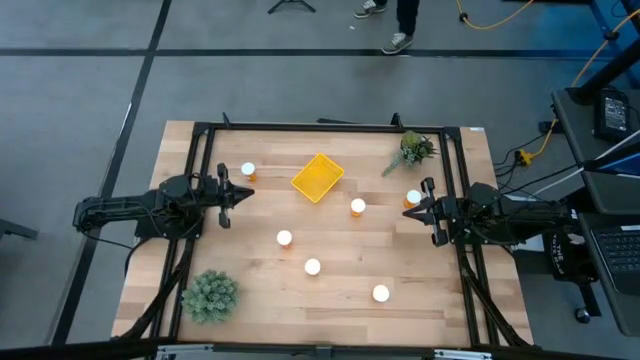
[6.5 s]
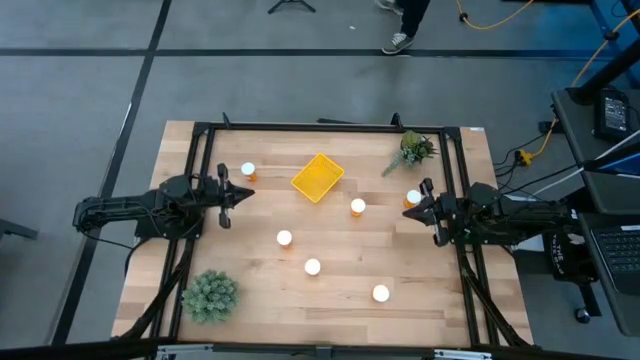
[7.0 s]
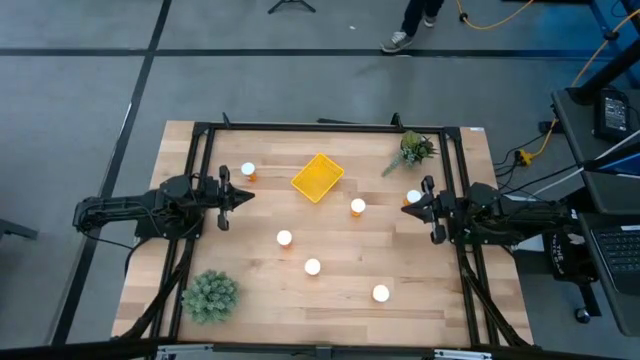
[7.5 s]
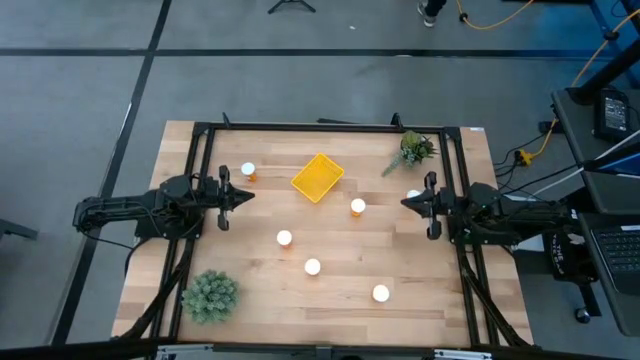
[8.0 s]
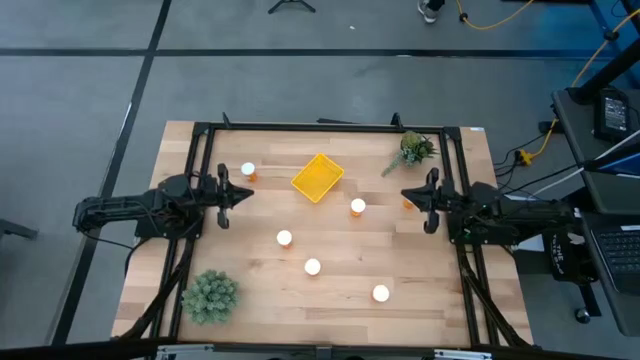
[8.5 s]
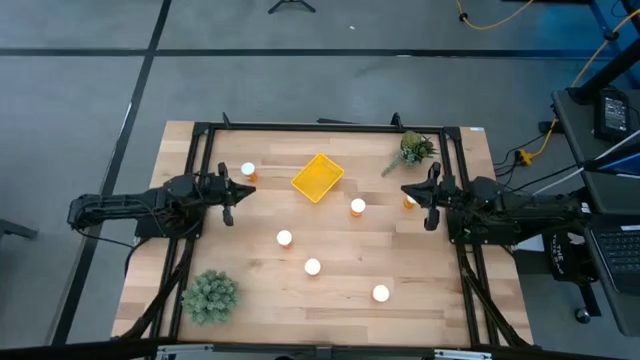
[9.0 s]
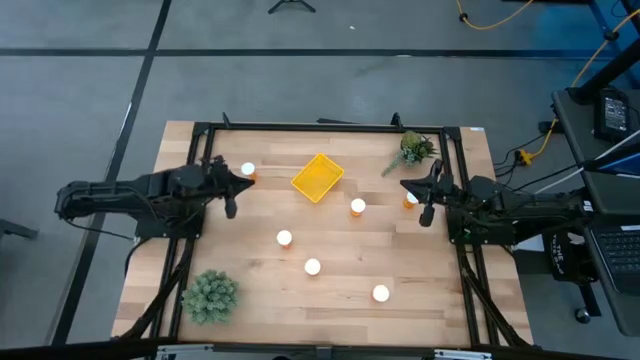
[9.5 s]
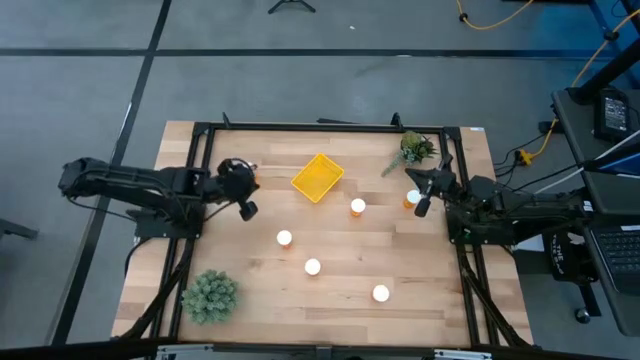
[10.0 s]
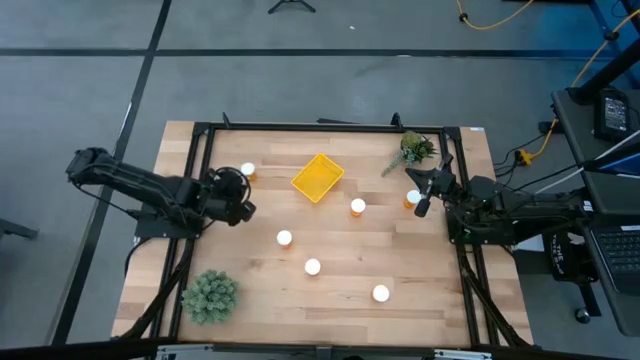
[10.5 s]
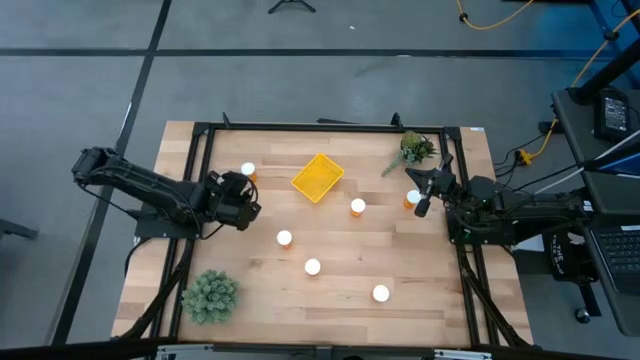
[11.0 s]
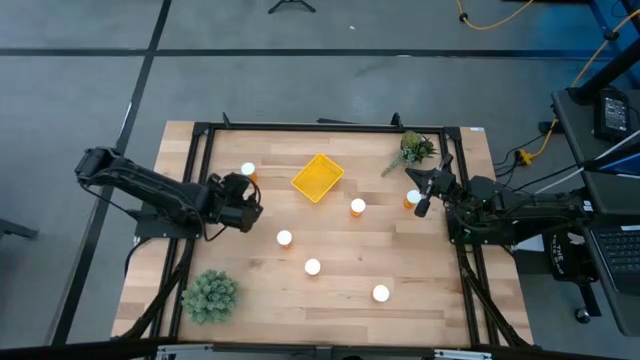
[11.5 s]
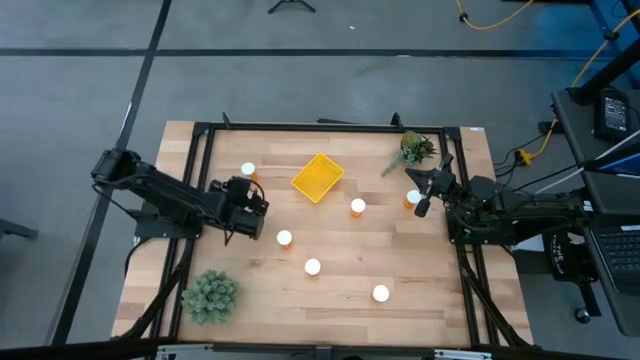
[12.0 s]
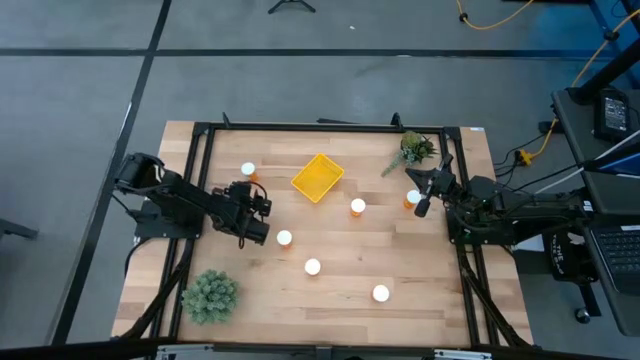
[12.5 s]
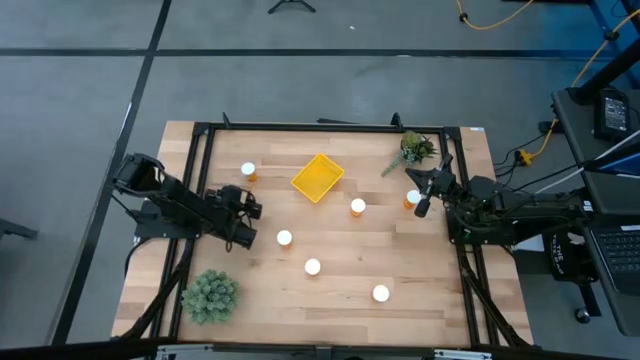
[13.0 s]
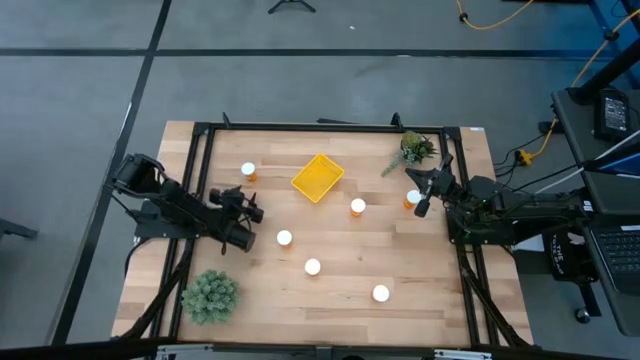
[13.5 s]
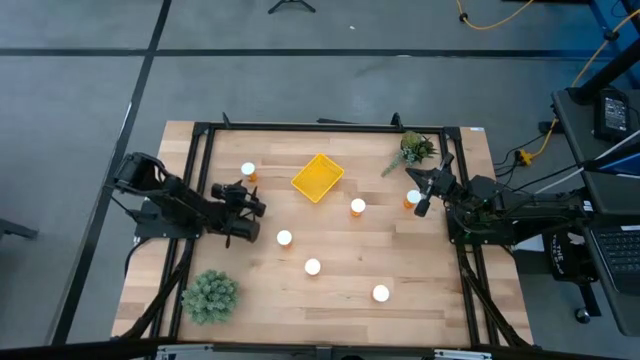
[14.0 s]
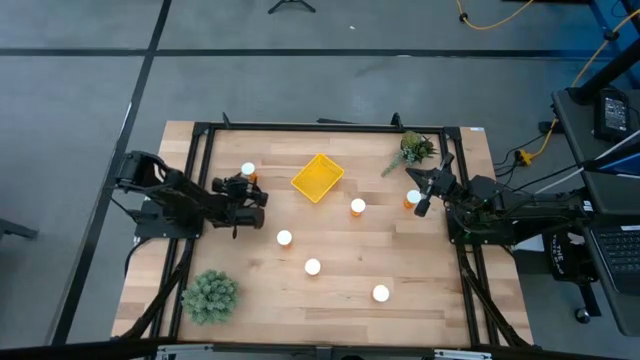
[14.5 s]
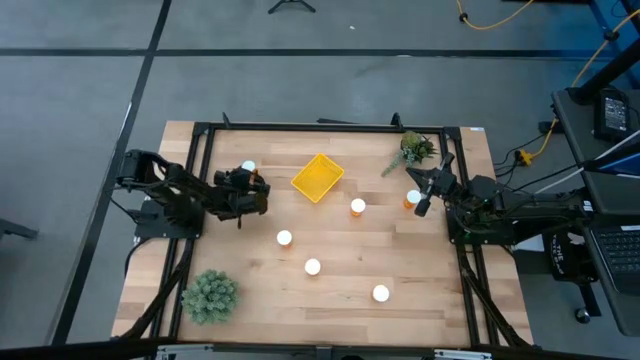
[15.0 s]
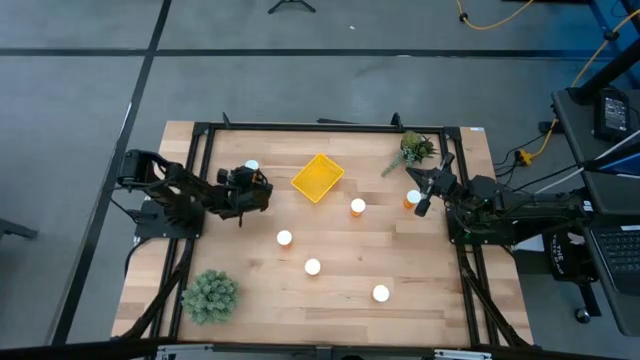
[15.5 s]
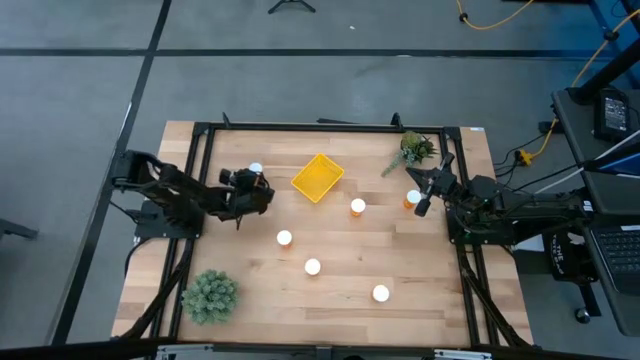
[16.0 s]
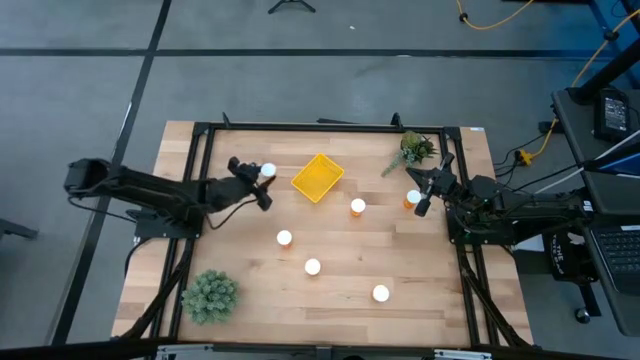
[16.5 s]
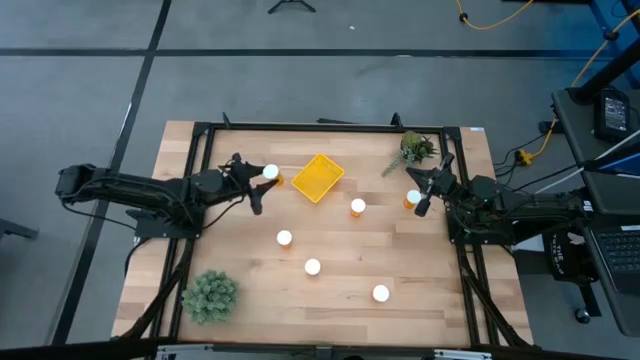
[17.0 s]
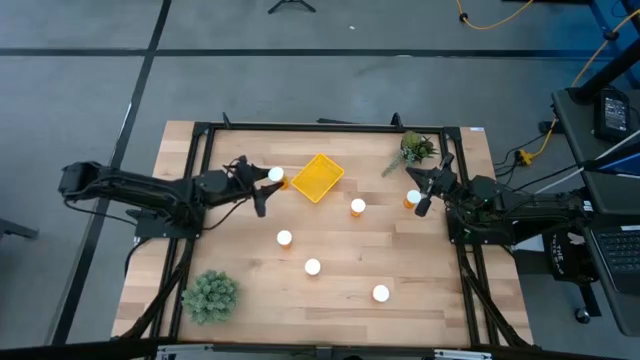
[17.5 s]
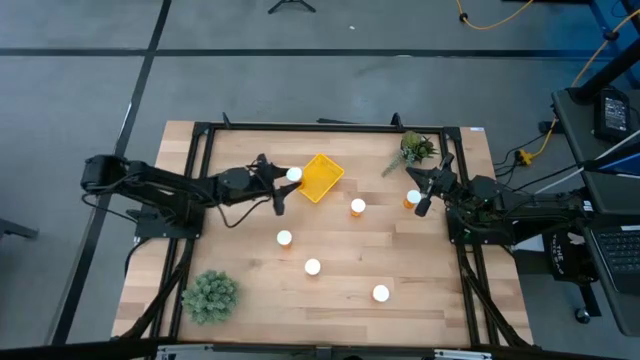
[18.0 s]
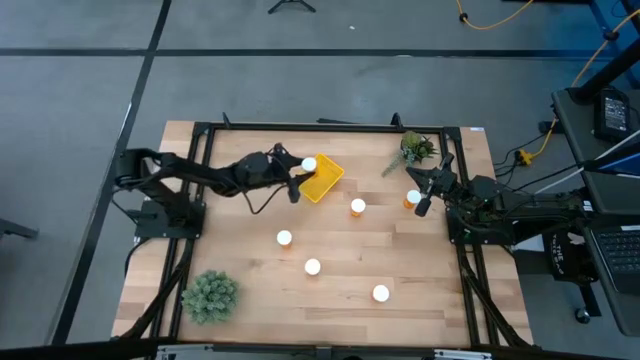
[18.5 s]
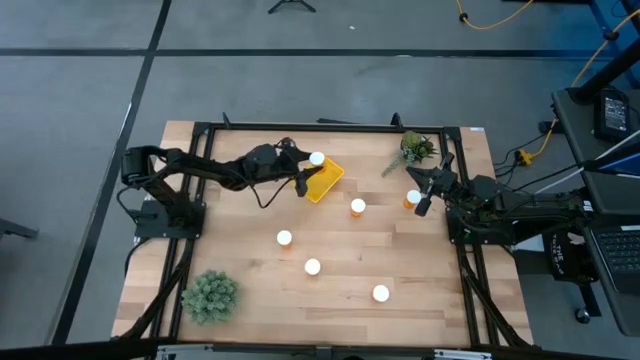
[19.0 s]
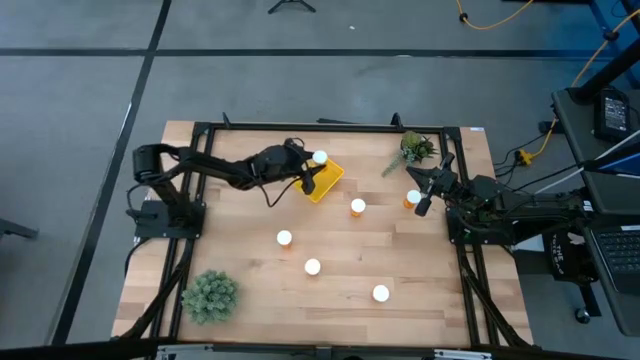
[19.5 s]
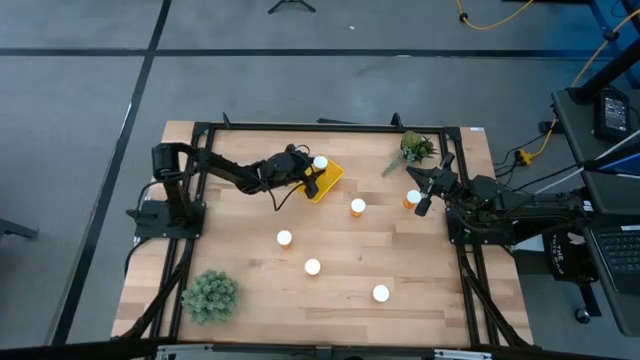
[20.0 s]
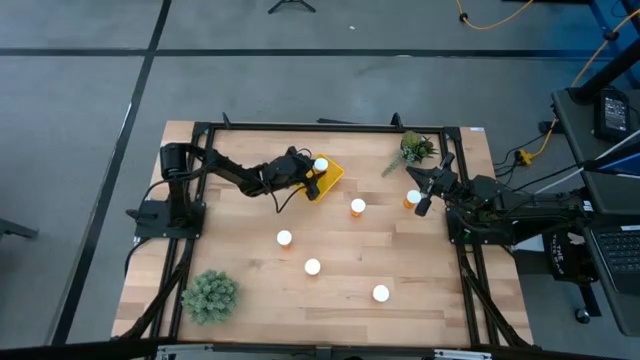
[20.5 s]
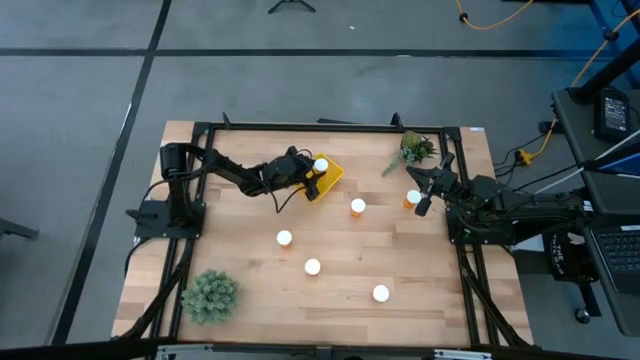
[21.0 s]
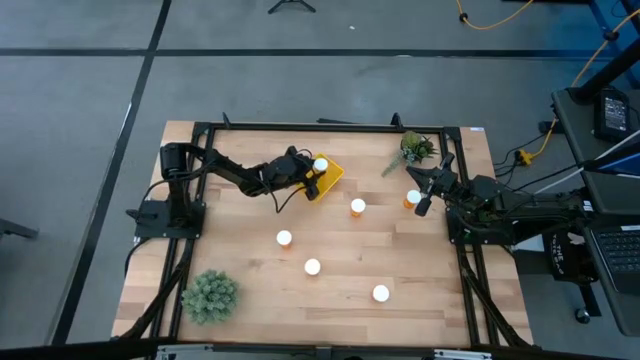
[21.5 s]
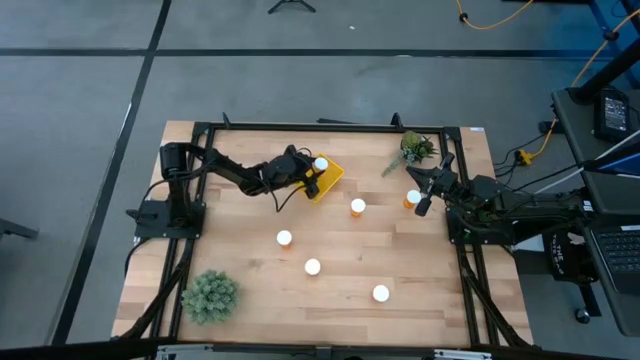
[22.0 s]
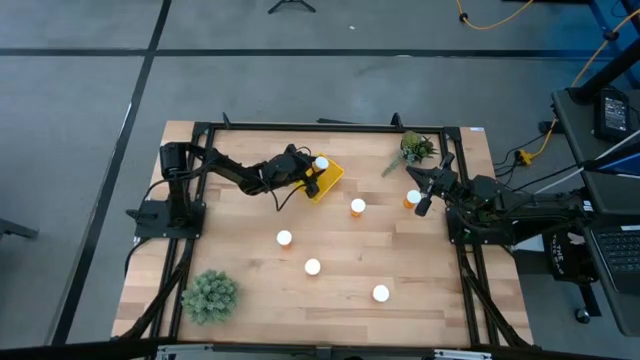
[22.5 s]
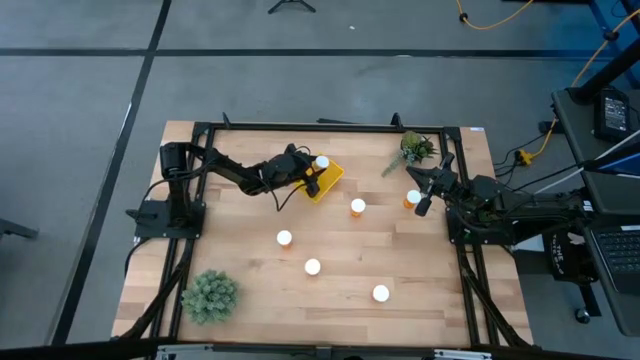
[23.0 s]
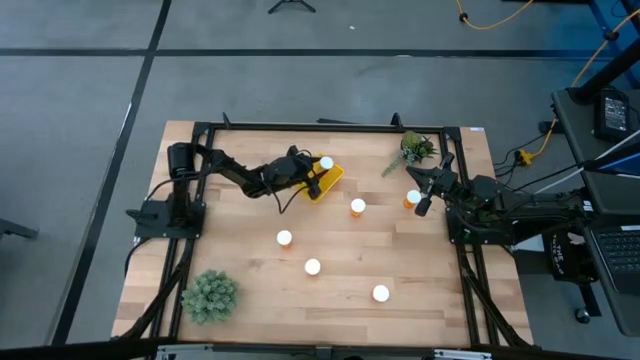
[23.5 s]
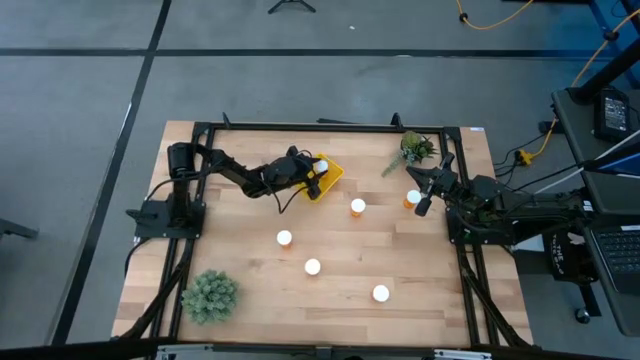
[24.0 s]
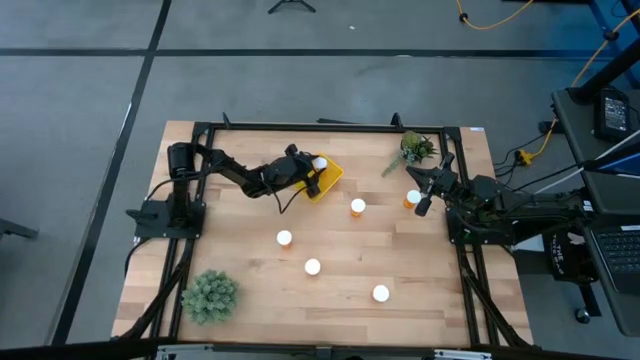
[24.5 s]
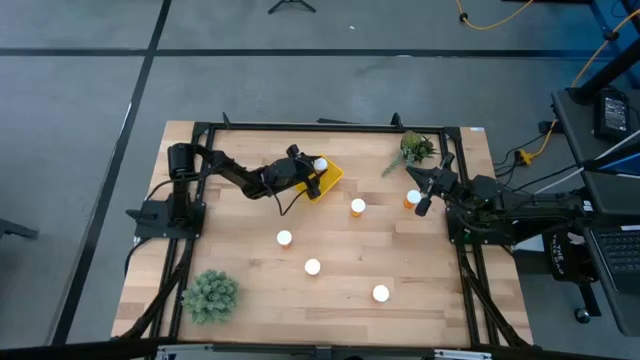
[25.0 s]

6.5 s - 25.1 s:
Task: Pick and place pill bottles into a basket
Put the pill bottle into the bin
